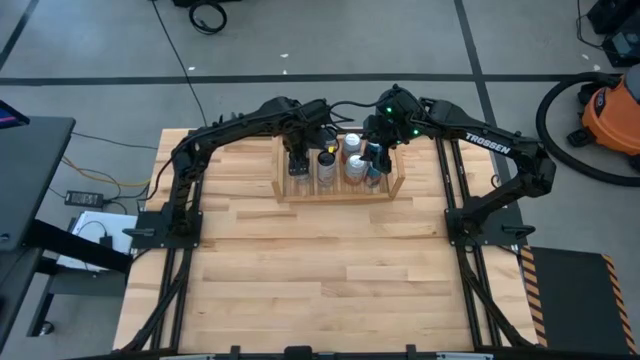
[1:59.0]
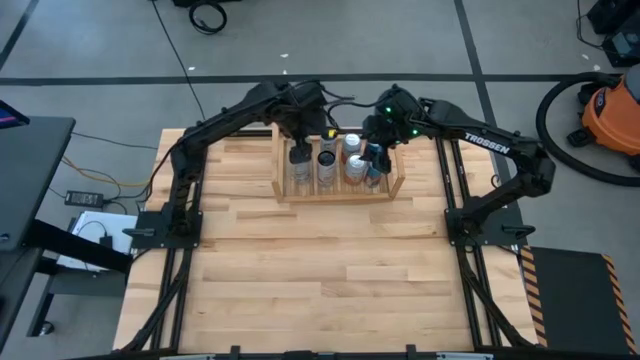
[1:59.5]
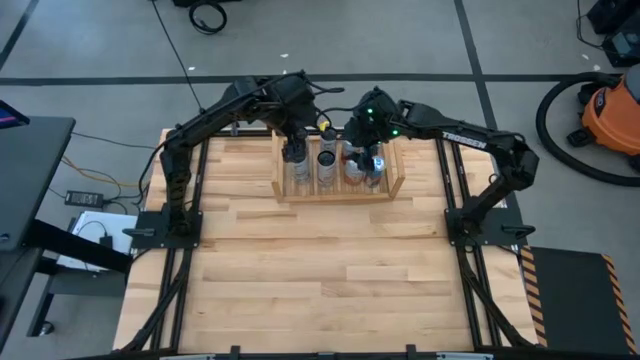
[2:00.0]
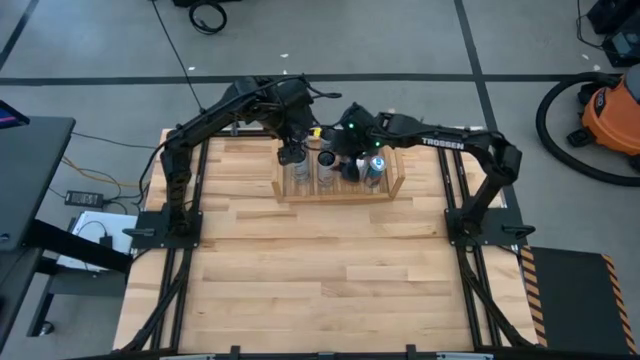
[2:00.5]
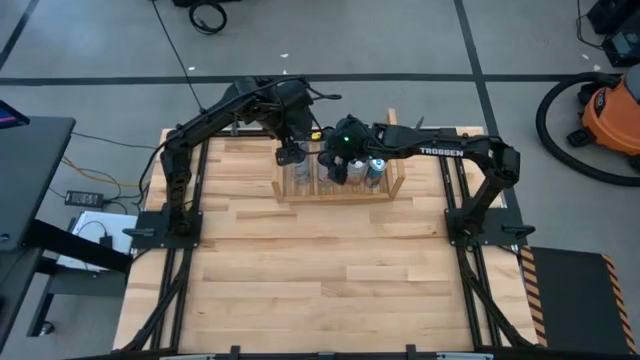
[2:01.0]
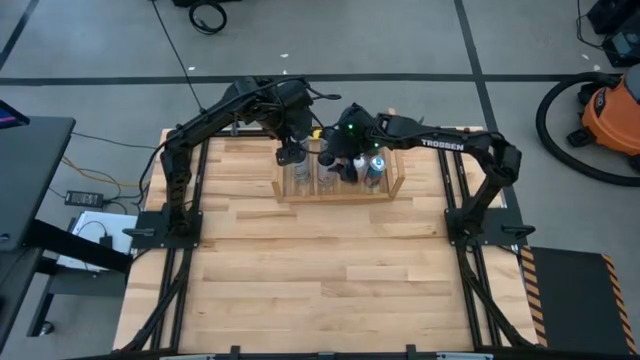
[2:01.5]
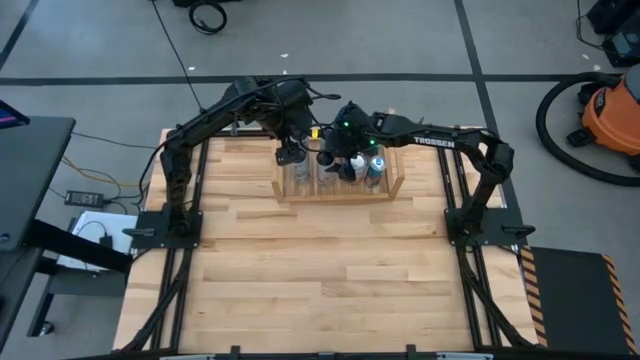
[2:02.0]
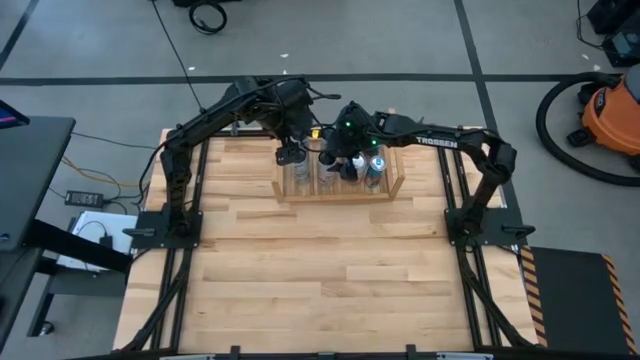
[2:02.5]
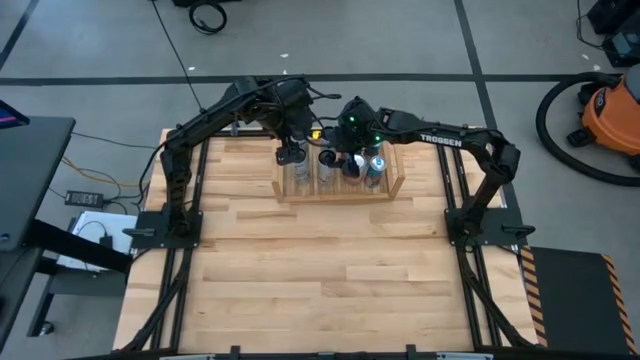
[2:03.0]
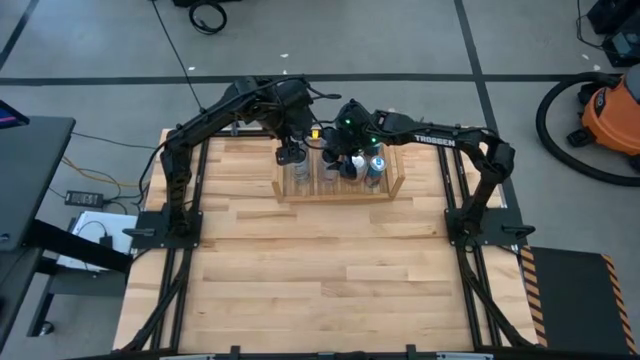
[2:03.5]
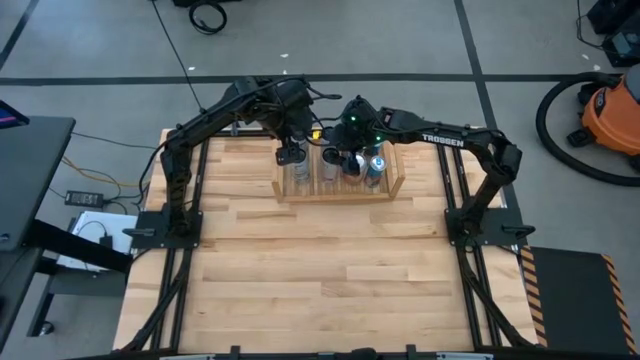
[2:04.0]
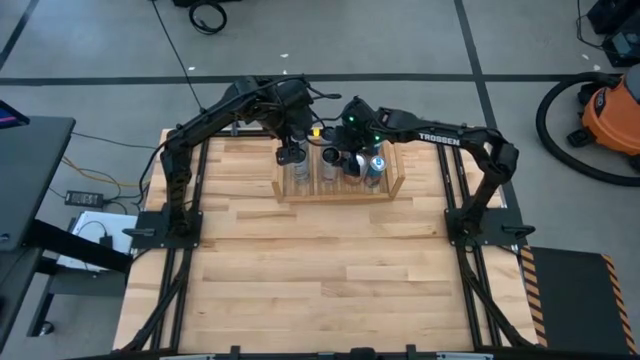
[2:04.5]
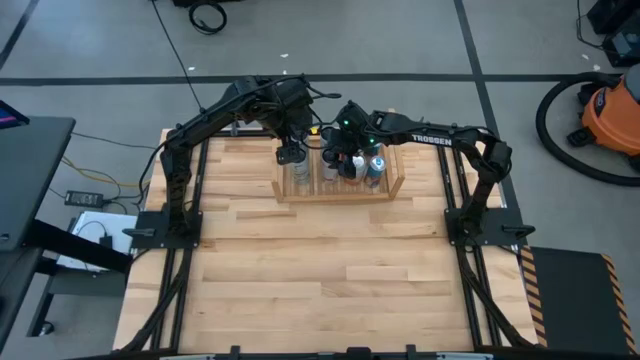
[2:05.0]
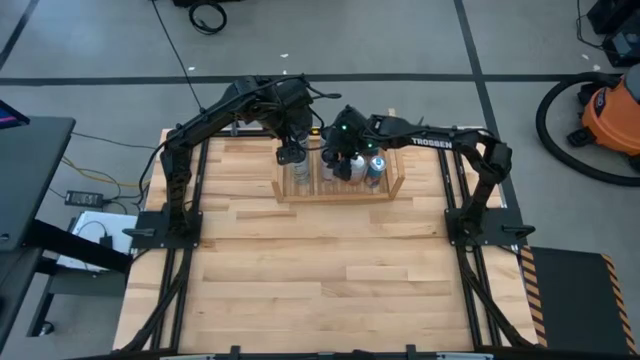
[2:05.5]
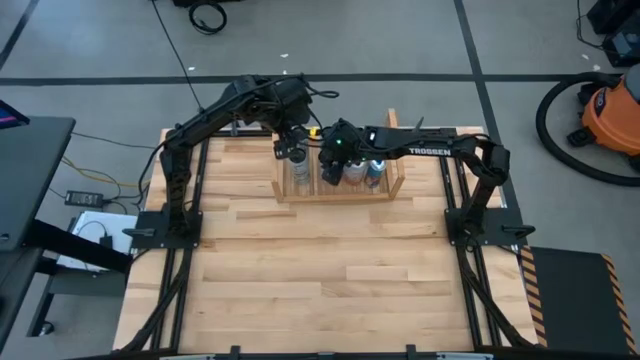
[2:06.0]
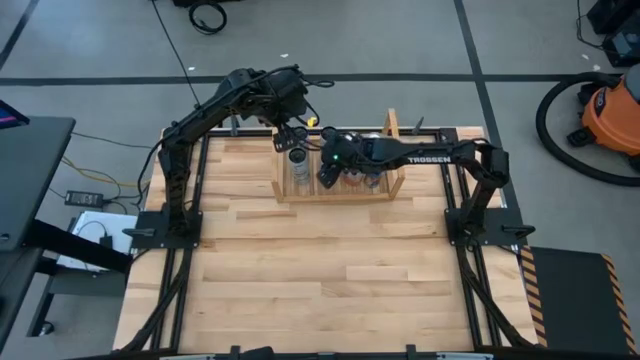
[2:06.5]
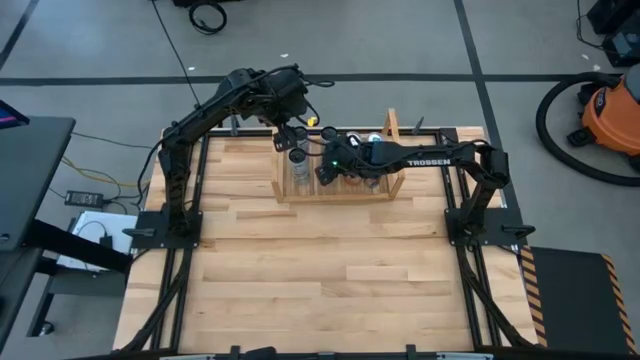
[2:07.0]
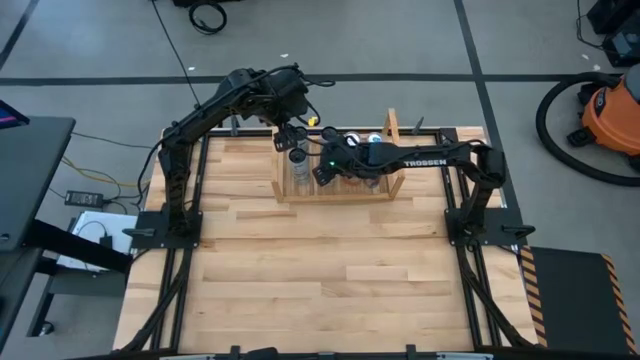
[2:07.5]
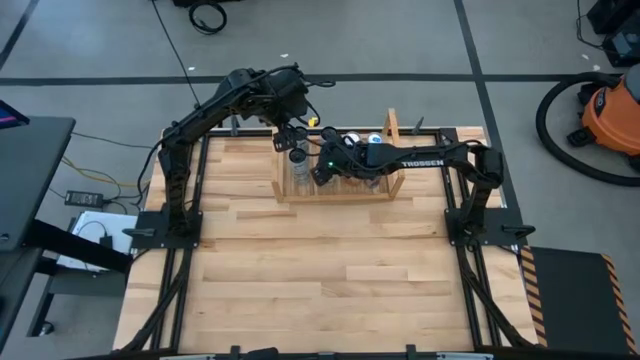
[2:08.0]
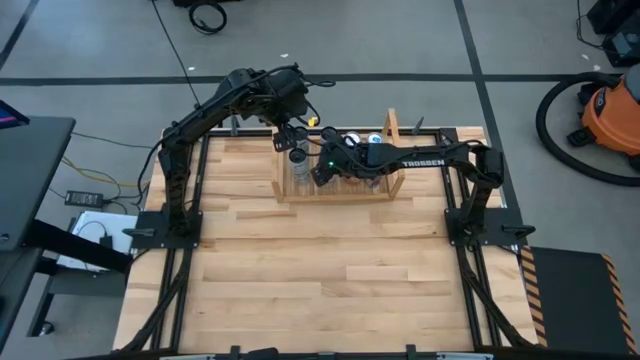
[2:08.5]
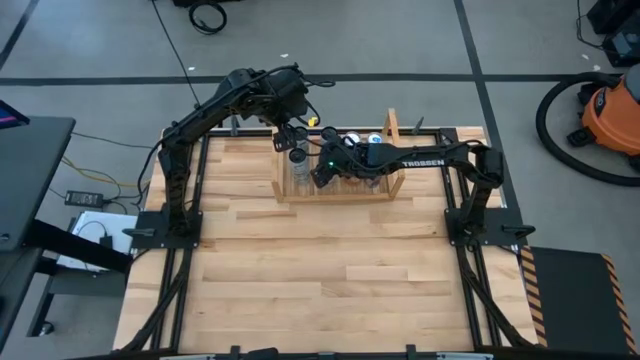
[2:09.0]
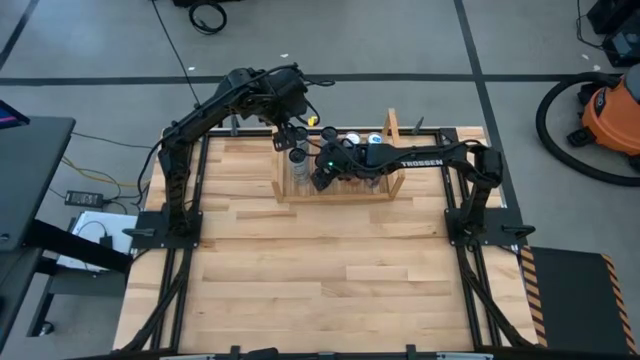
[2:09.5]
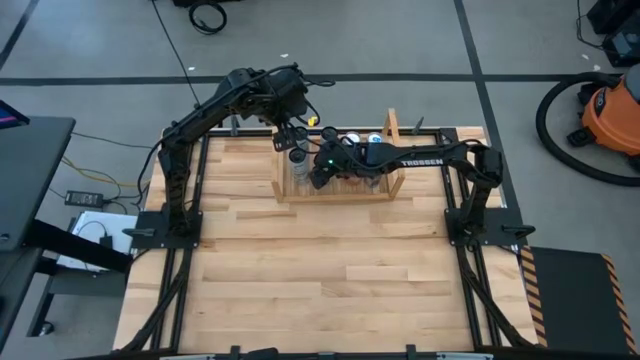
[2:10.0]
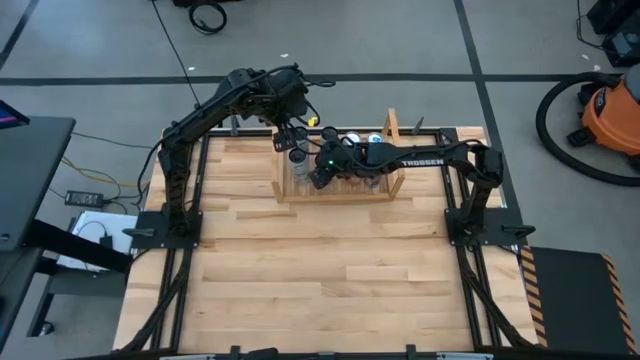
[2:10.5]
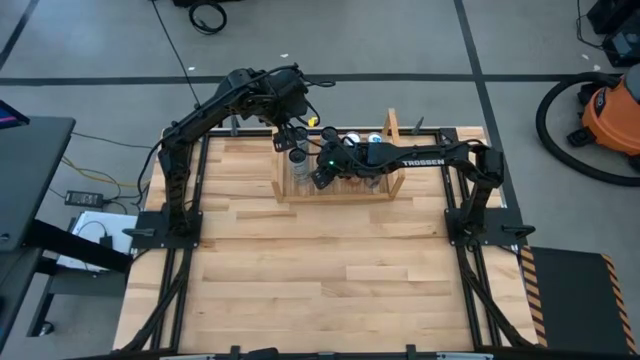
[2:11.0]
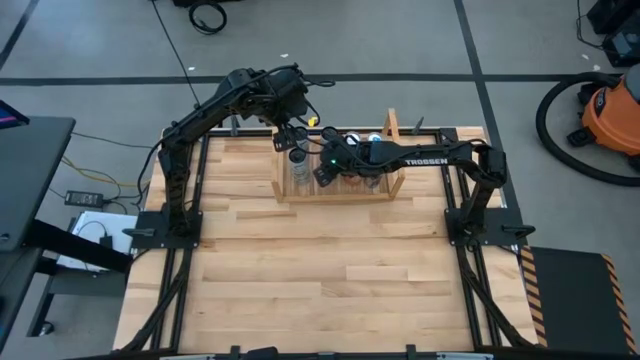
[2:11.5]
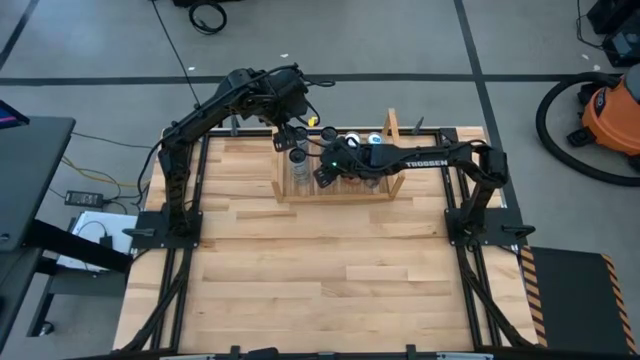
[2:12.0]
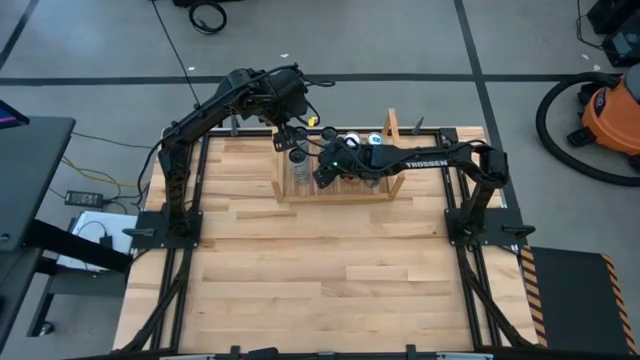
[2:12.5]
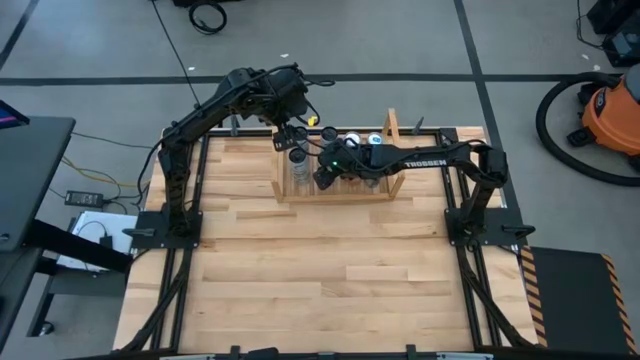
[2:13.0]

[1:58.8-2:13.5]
Task: Place canned beverage on shelf
Adjust the center white soda can
